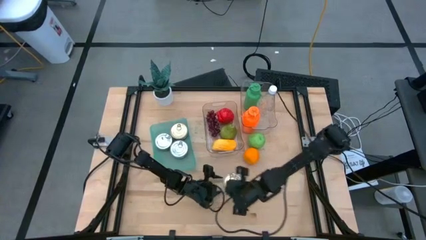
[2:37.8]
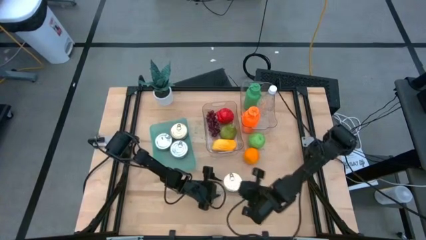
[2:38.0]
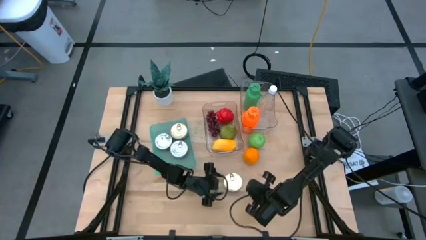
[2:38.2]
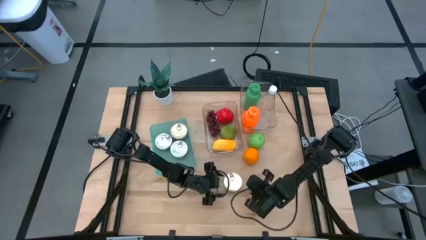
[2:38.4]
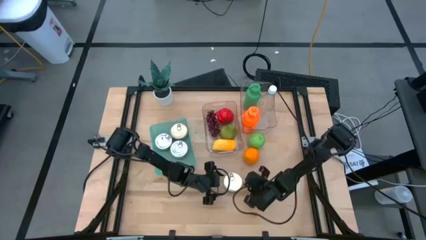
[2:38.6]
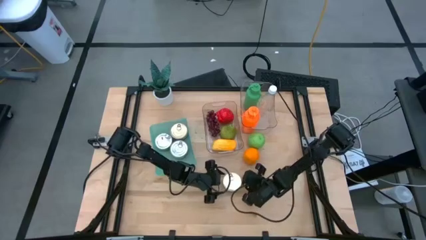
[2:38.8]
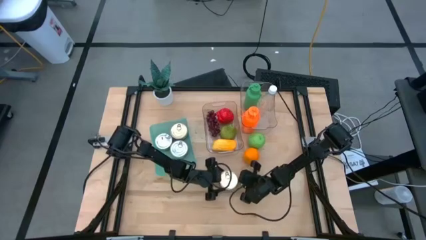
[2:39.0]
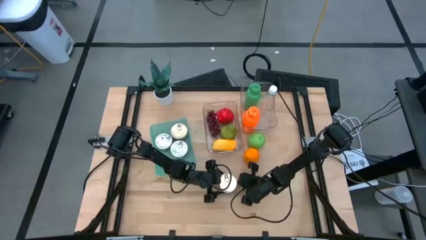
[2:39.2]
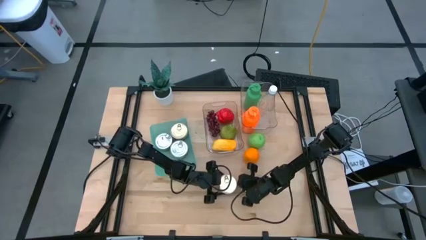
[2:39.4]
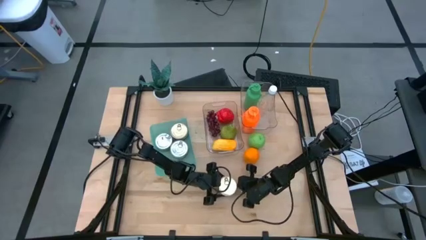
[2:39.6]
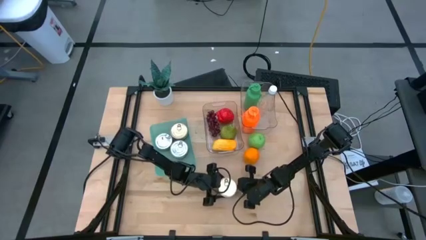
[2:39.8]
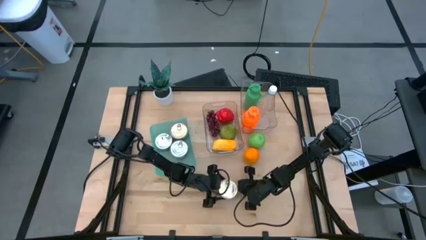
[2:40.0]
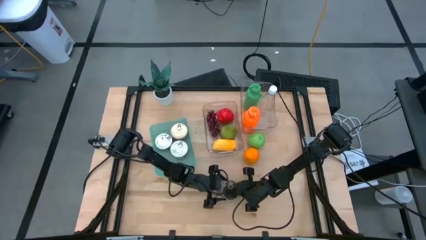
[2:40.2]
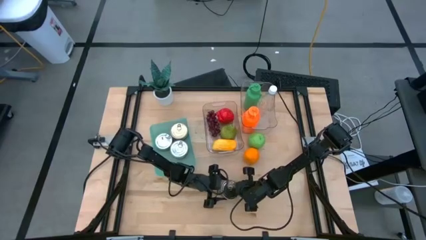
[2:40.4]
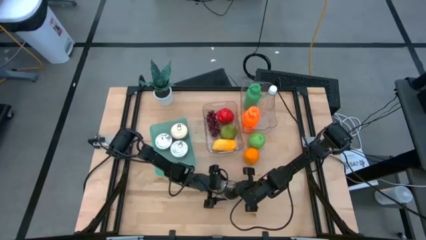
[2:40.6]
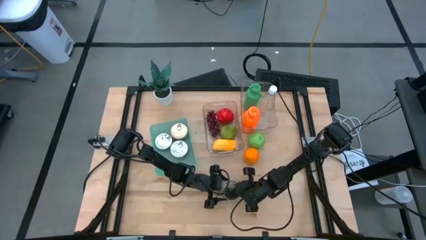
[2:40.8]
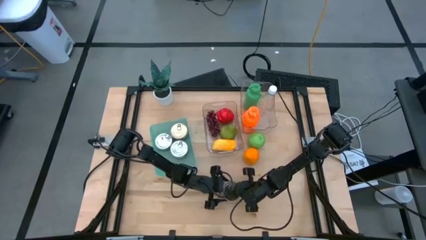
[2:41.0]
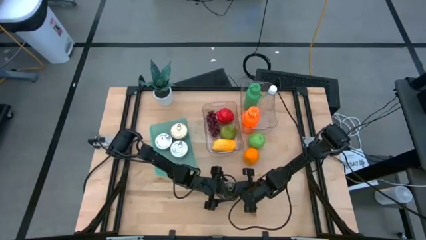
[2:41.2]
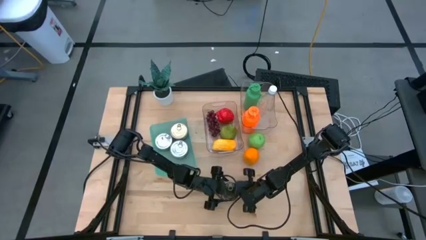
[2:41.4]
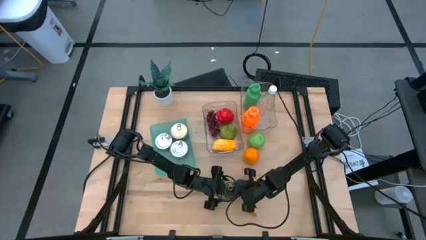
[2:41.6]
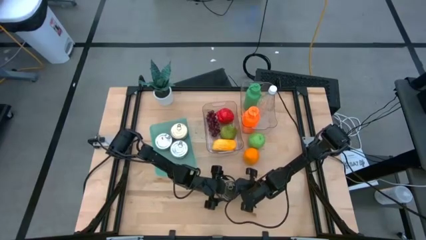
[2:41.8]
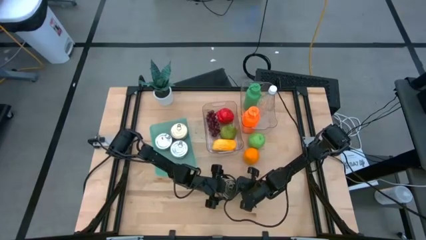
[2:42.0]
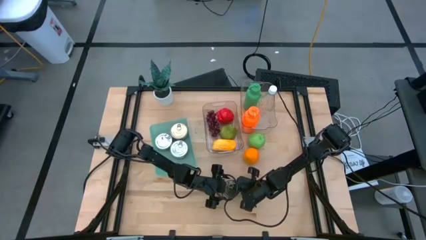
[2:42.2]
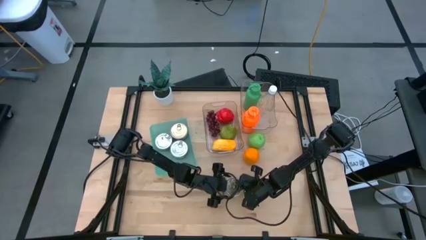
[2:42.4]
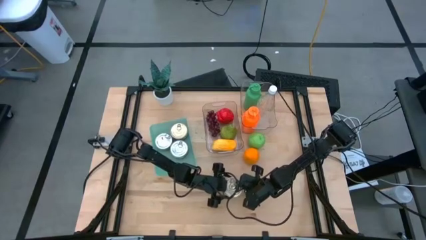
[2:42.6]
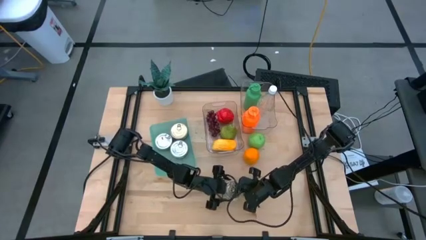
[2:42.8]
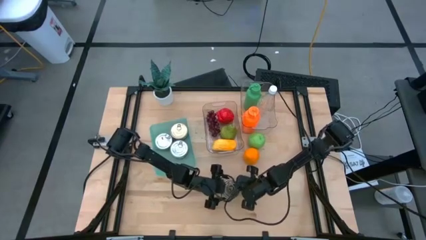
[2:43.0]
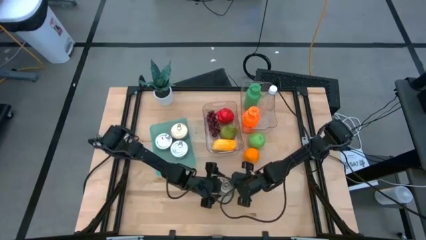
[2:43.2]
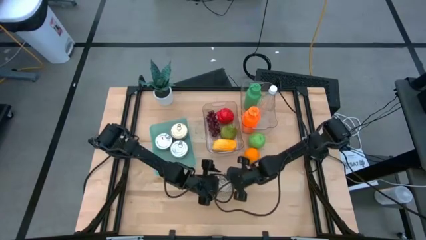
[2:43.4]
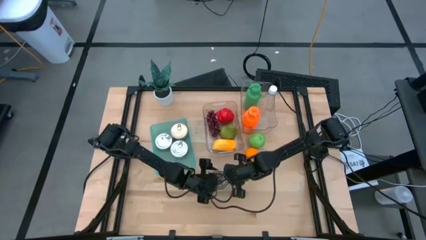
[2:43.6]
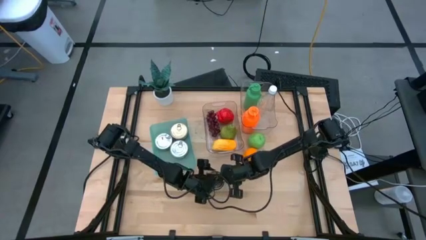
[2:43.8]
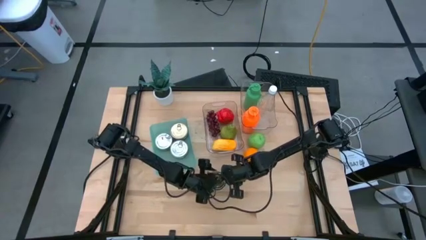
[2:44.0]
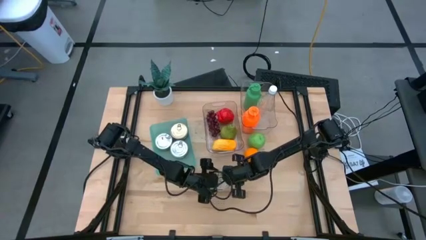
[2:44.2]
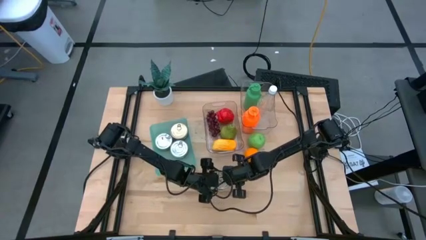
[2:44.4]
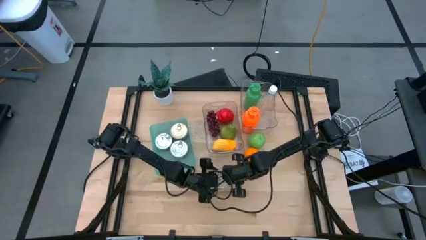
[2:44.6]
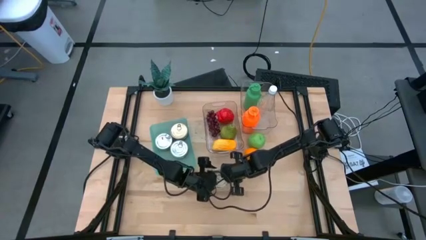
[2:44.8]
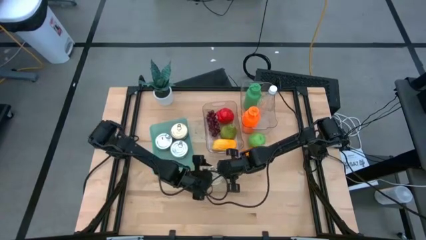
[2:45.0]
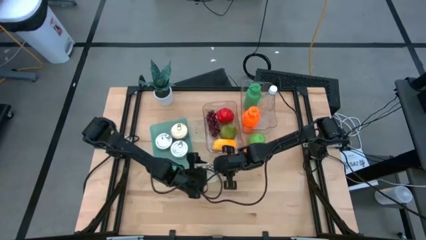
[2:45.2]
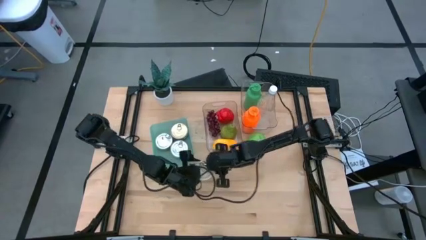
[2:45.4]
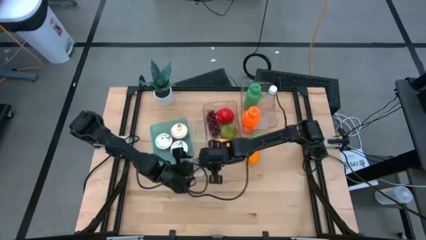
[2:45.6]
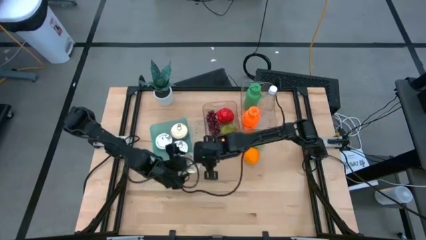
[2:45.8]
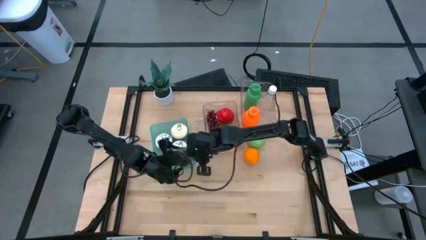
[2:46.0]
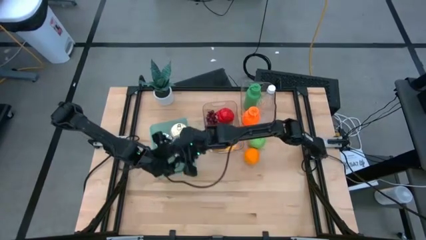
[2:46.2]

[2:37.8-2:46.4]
Task: Pick & Place Food Item
Put the blue tuna can into the green bin

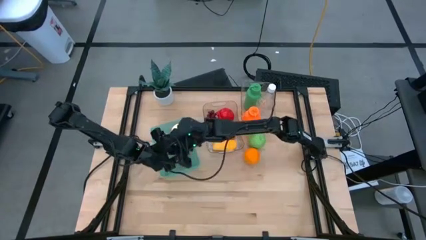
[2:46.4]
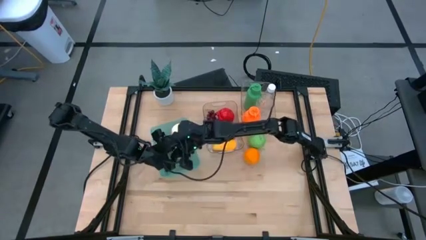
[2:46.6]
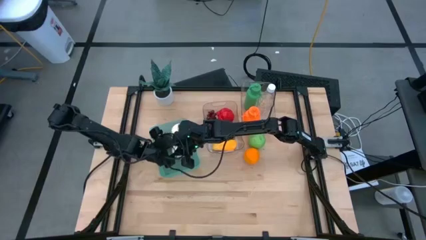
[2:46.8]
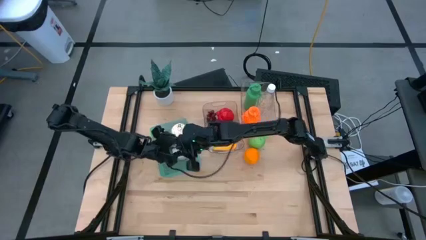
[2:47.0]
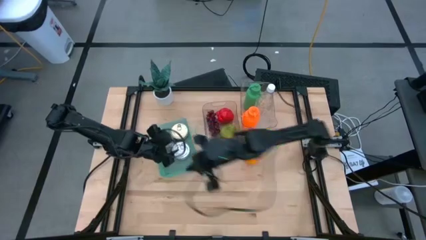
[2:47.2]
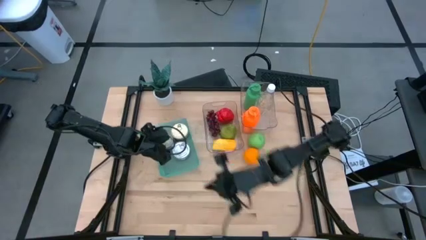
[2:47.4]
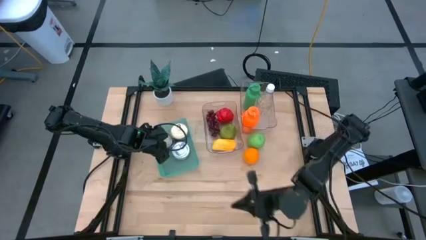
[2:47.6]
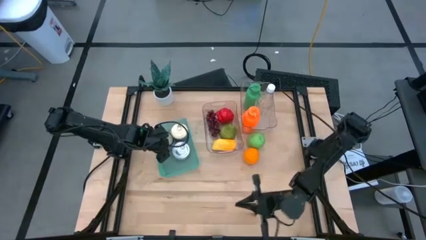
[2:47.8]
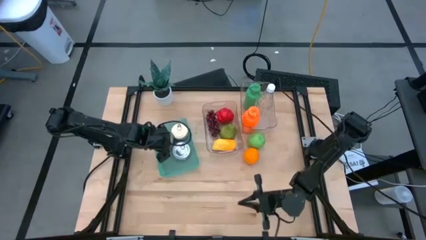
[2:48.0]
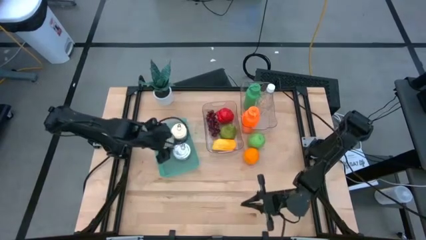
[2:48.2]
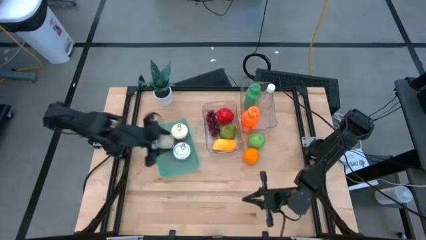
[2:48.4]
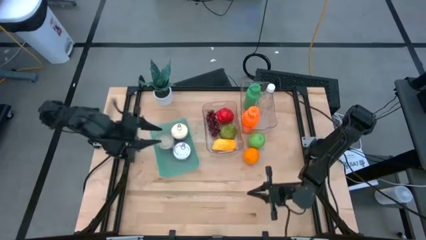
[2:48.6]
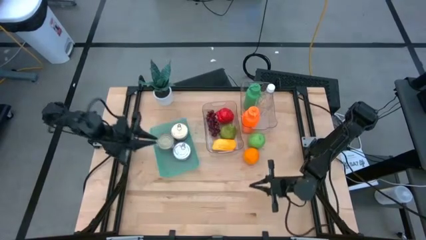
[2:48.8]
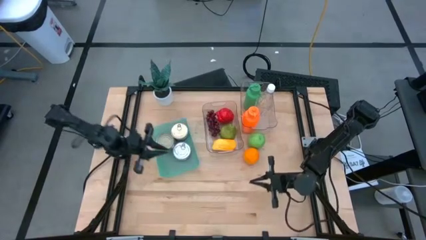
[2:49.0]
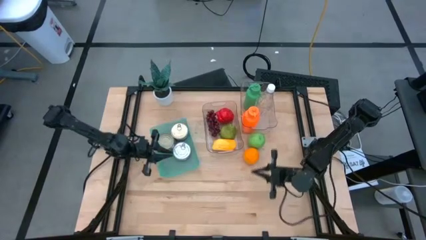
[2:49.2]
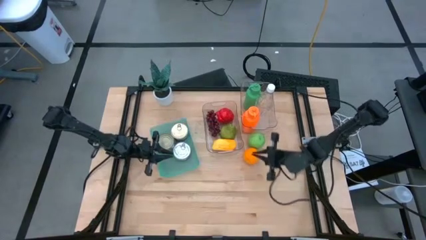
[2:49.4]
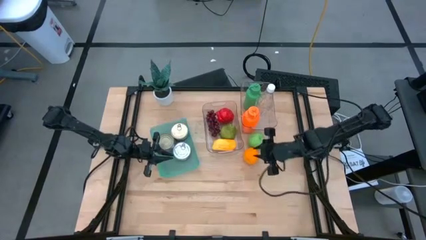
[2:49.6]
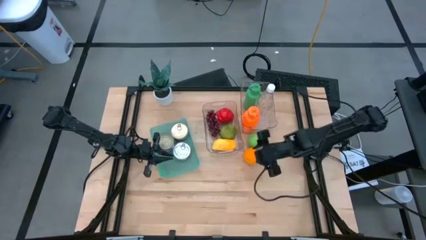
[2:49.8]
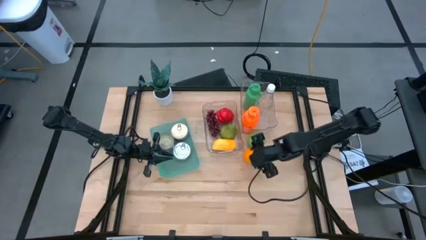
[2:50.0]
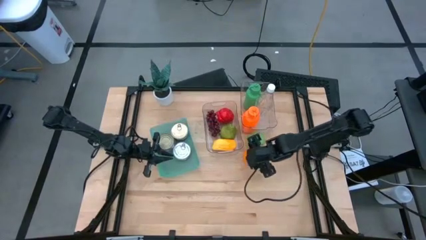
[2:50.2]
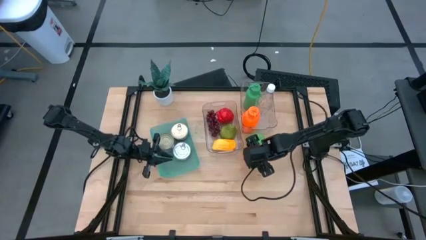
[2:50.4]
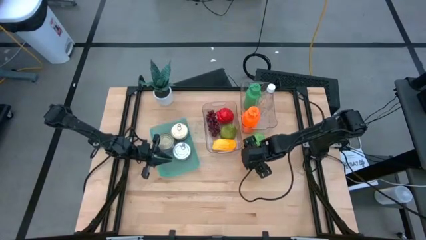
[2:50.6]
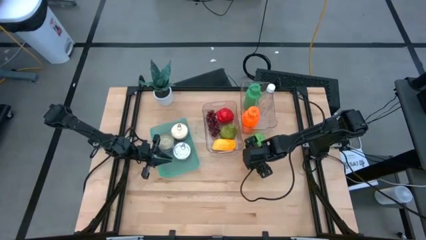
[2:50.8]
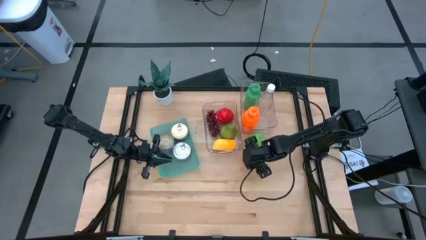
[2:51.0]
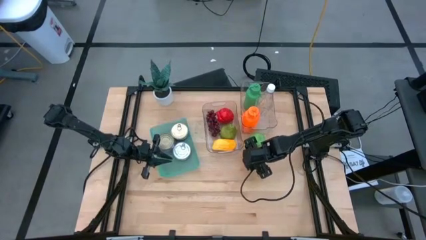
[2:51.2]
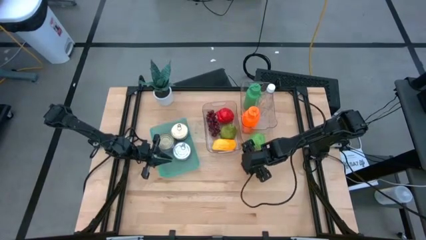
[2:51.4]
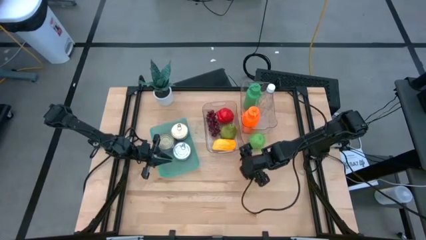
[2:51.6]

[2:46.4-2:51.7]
Put the orange into the bottom transparent bin

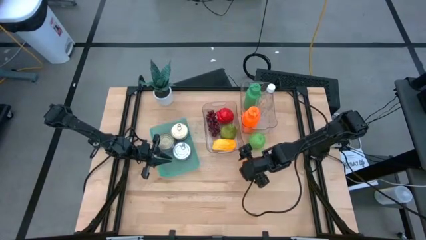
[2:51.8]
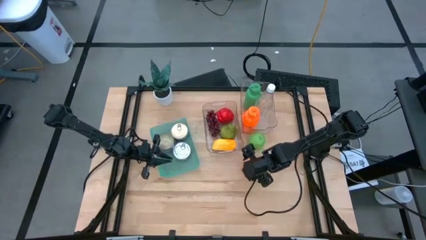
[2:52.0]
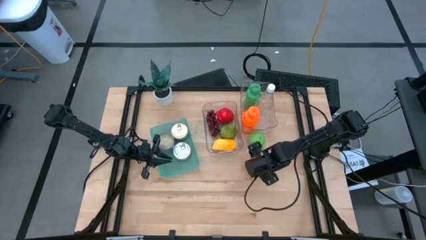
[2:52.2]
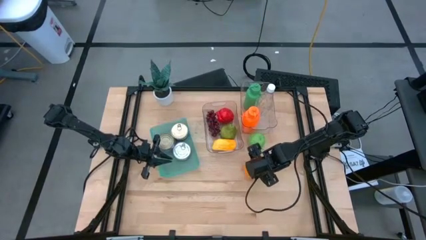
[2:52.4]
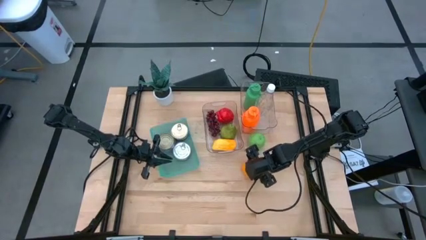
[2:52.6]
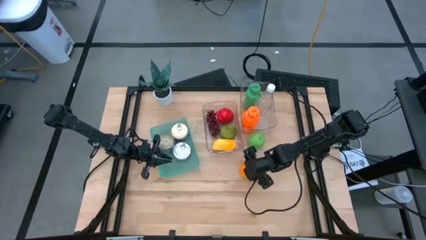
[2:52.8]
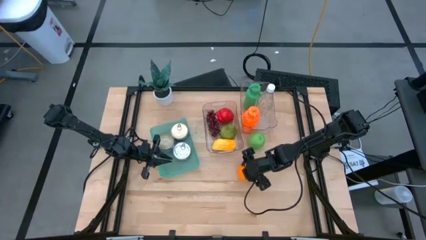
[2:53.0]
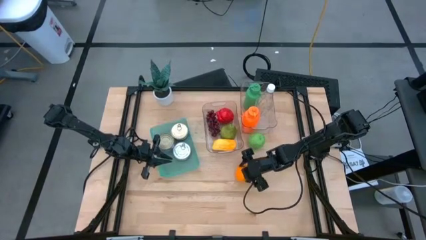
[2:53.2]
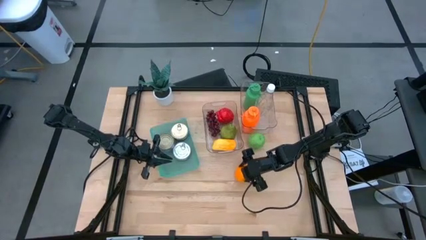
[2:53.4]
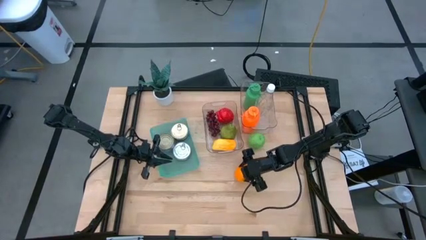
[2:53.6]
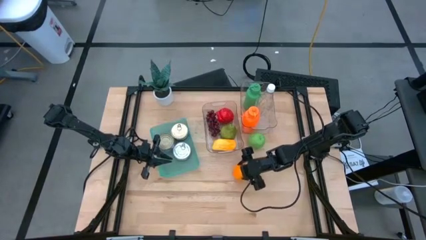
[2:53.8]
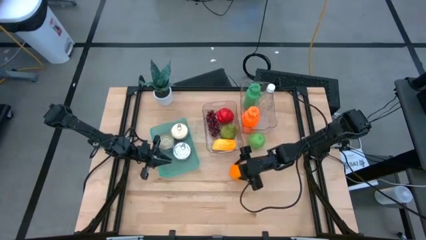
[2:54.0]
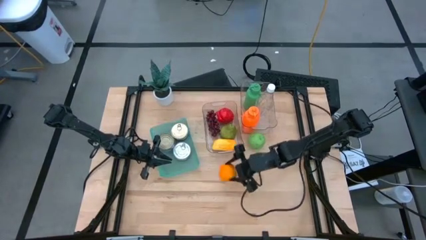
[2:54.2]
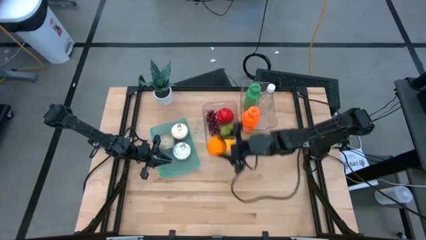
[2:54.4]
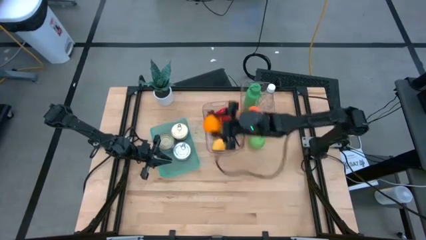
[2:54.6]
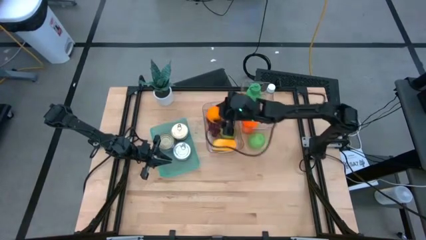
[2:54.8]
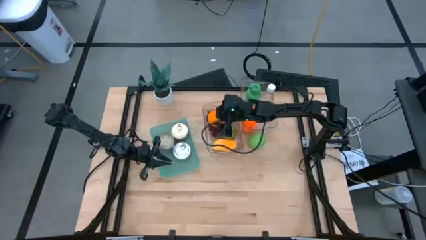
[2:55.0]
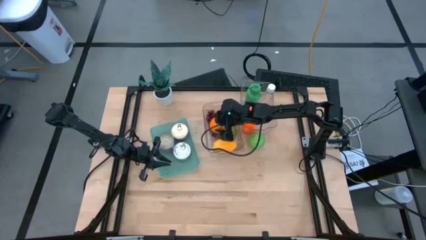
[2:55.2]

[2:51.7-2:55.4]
Put the orange into the bottom transparent bin
